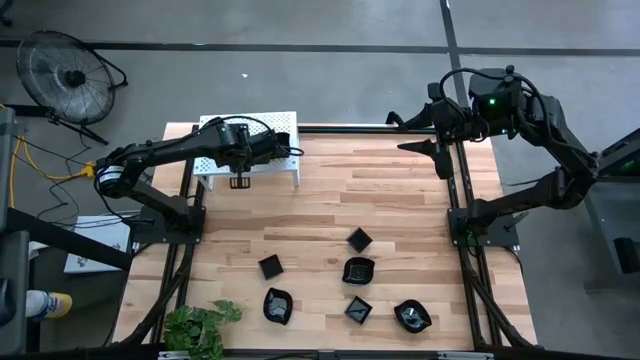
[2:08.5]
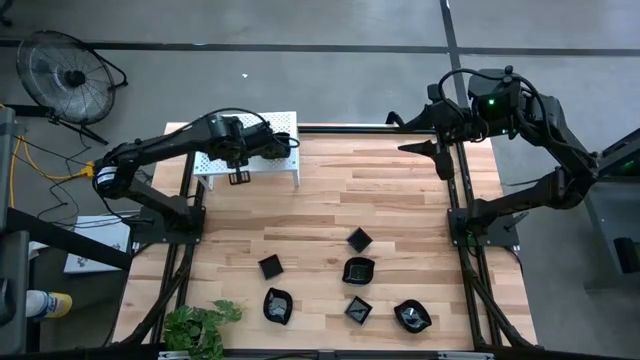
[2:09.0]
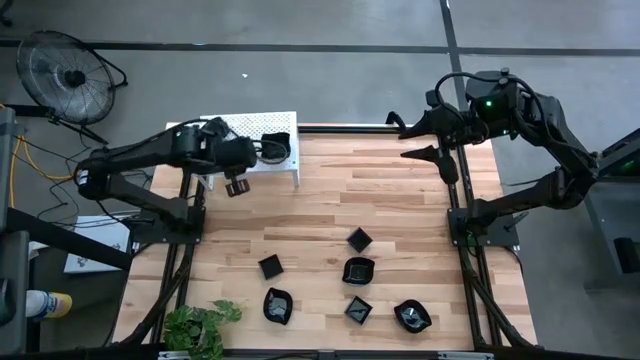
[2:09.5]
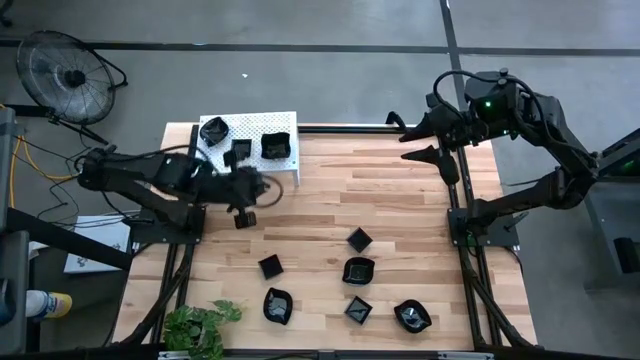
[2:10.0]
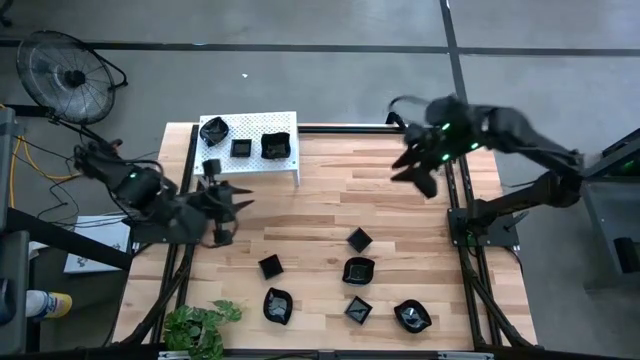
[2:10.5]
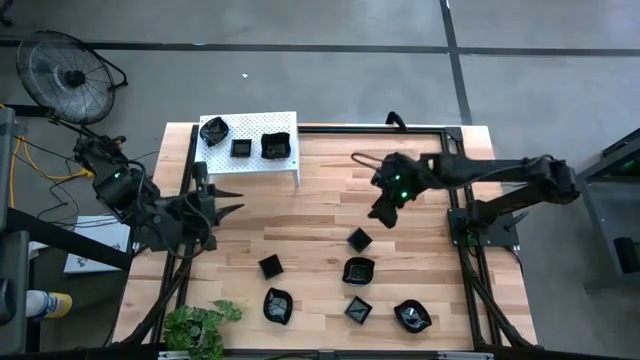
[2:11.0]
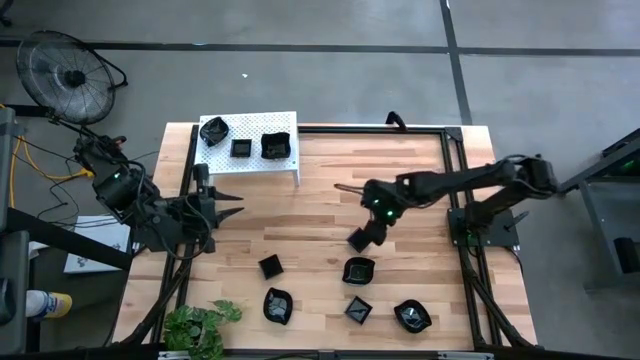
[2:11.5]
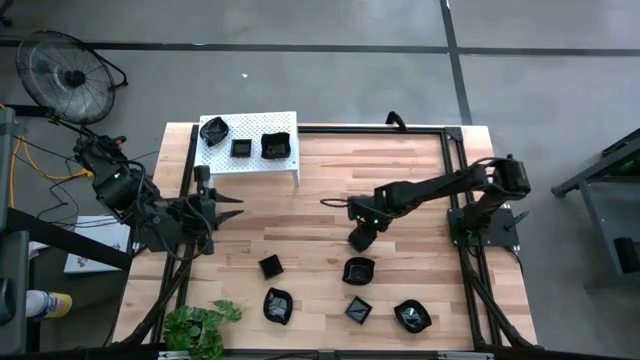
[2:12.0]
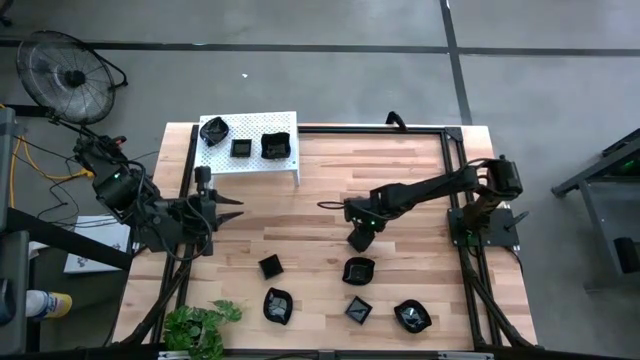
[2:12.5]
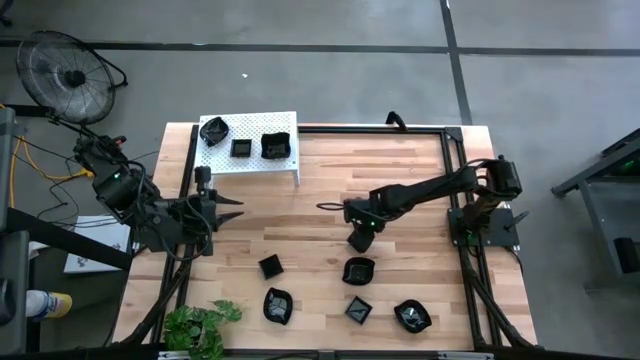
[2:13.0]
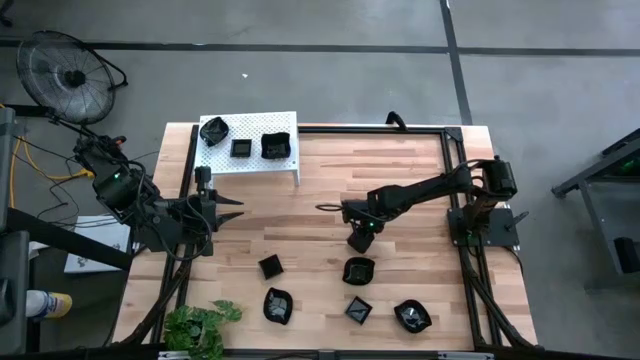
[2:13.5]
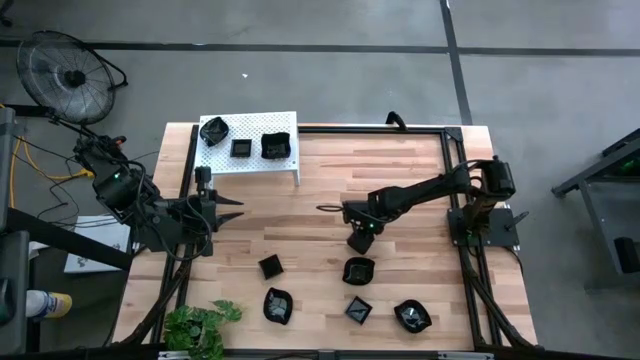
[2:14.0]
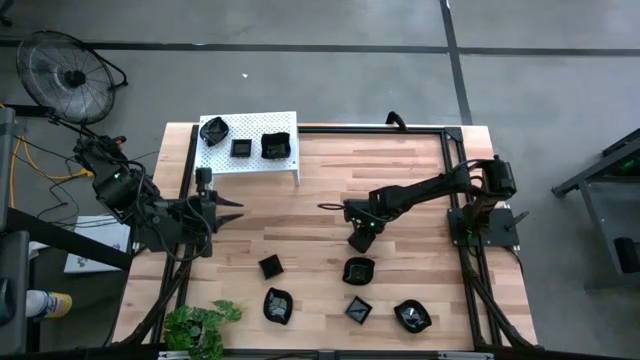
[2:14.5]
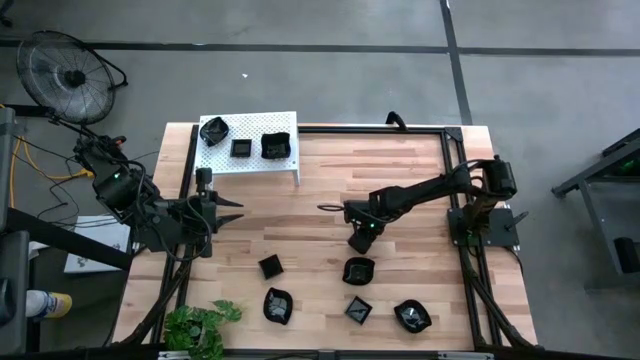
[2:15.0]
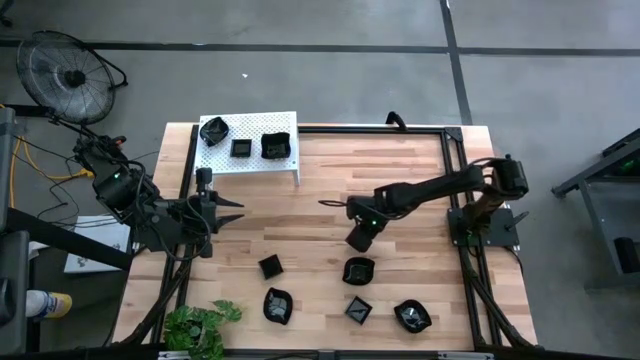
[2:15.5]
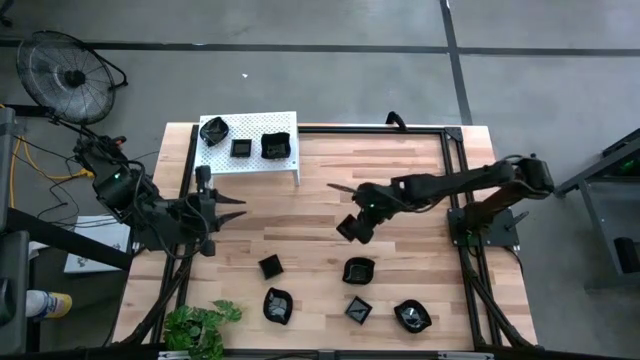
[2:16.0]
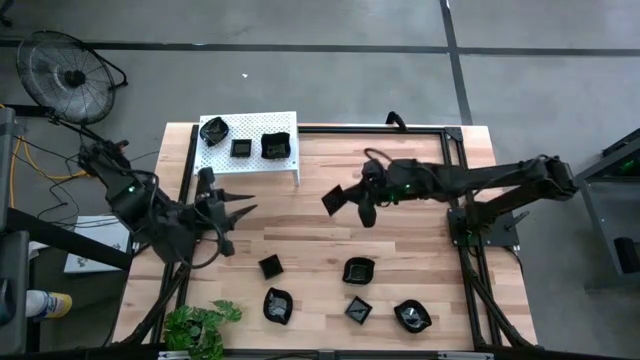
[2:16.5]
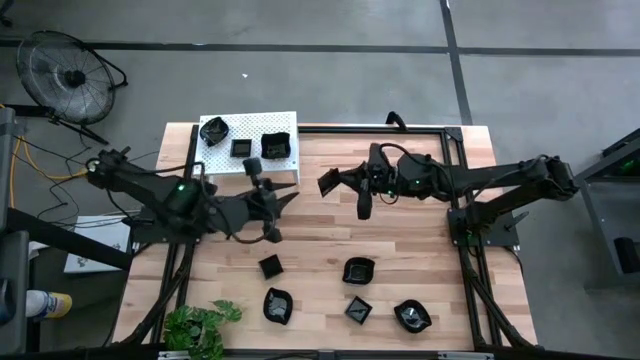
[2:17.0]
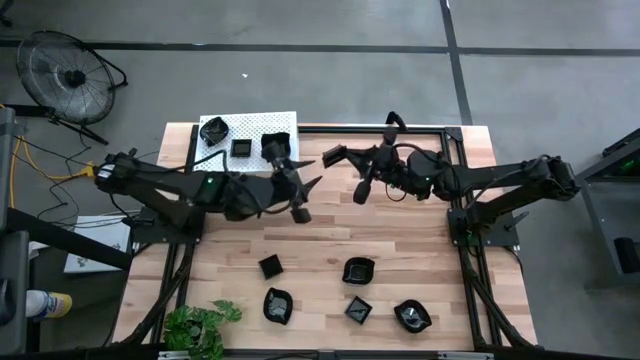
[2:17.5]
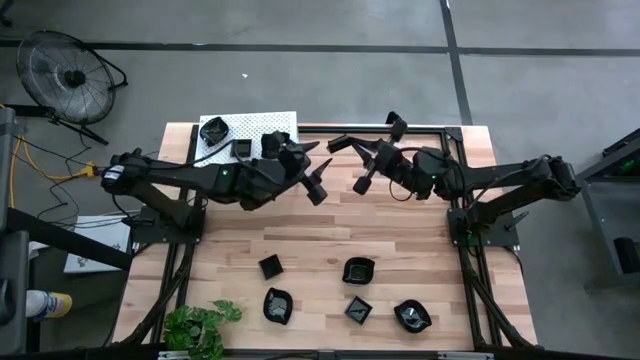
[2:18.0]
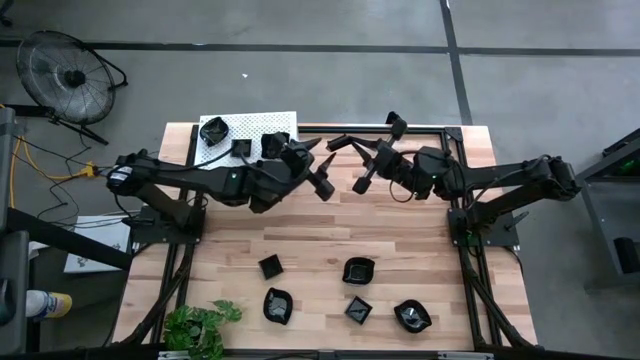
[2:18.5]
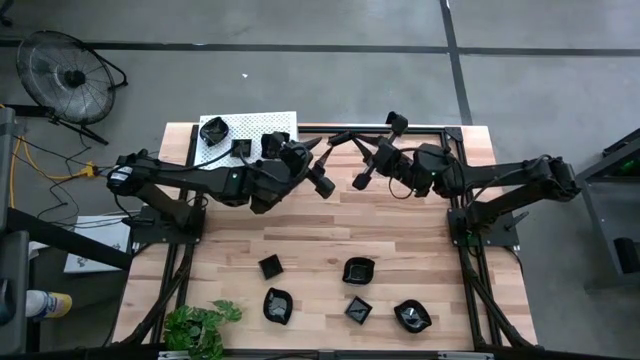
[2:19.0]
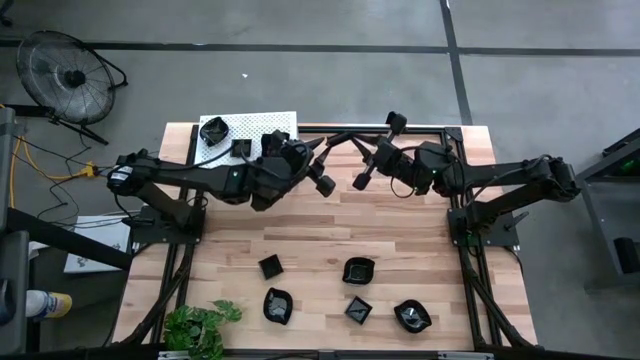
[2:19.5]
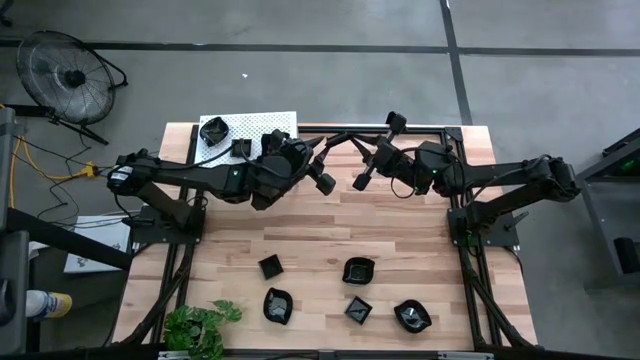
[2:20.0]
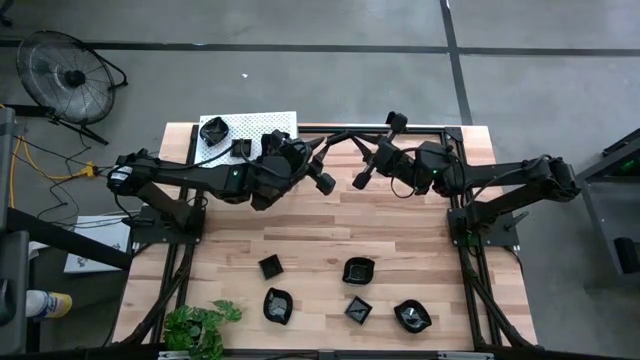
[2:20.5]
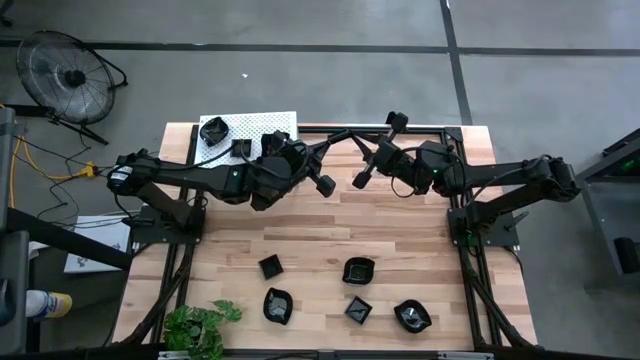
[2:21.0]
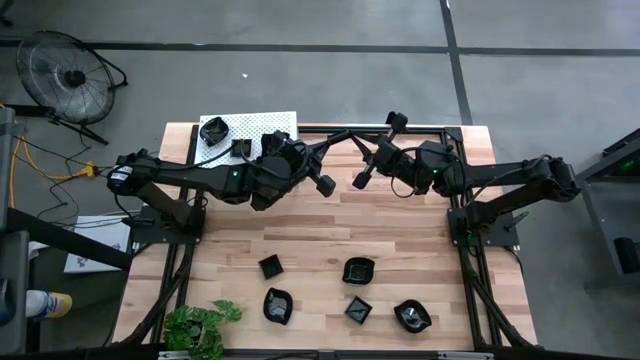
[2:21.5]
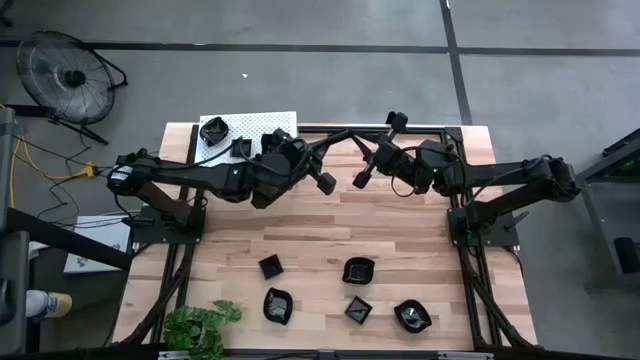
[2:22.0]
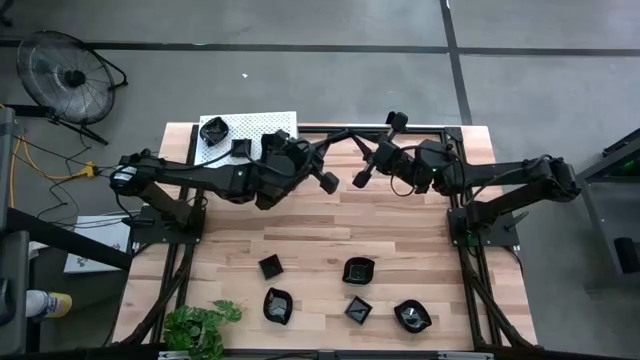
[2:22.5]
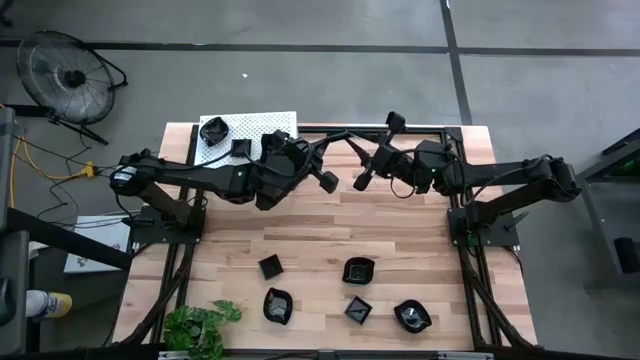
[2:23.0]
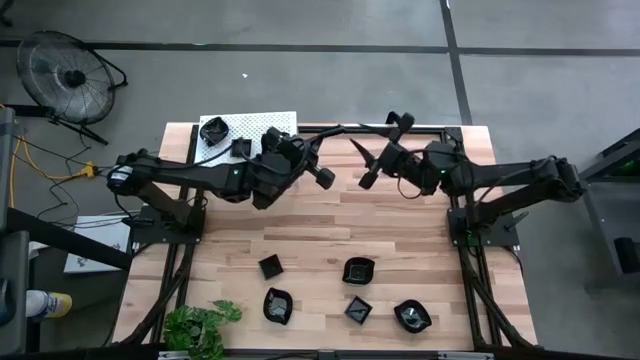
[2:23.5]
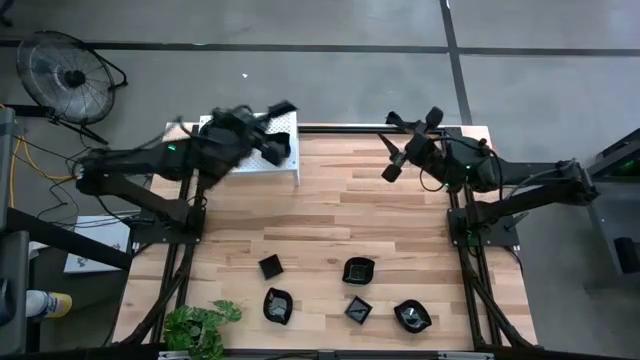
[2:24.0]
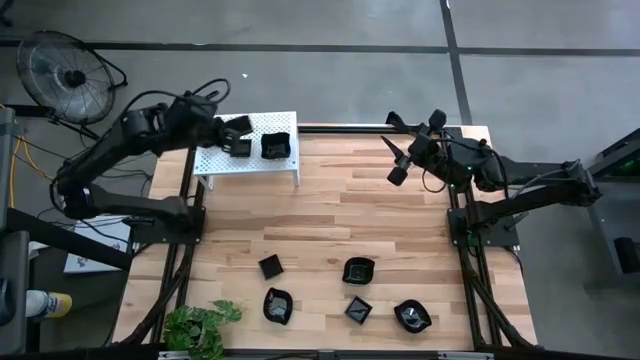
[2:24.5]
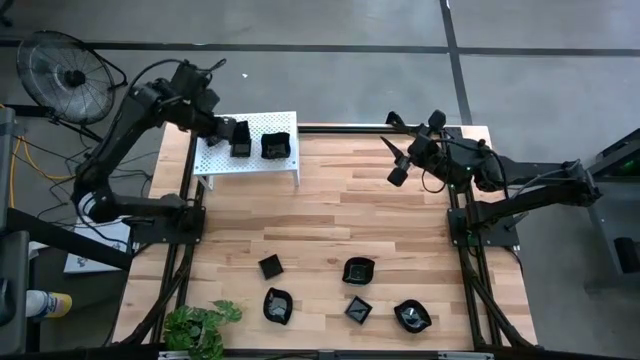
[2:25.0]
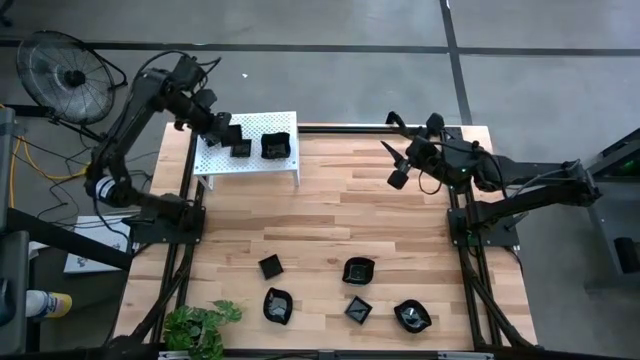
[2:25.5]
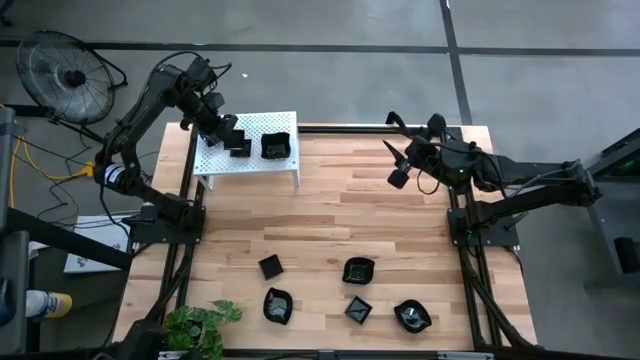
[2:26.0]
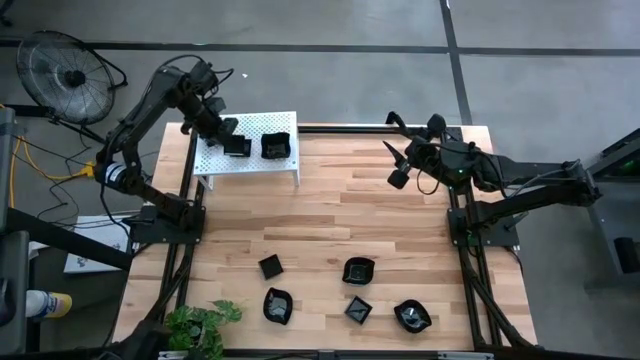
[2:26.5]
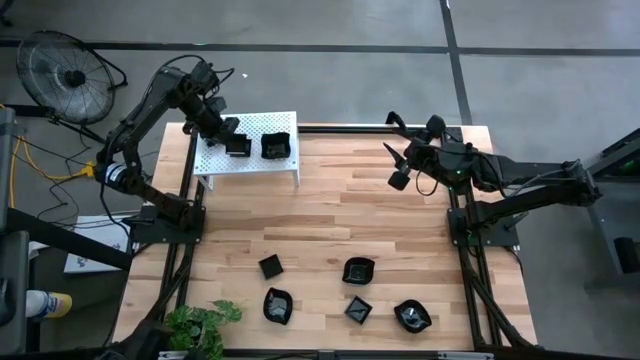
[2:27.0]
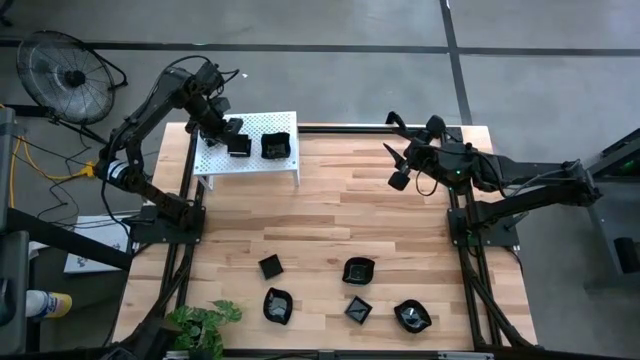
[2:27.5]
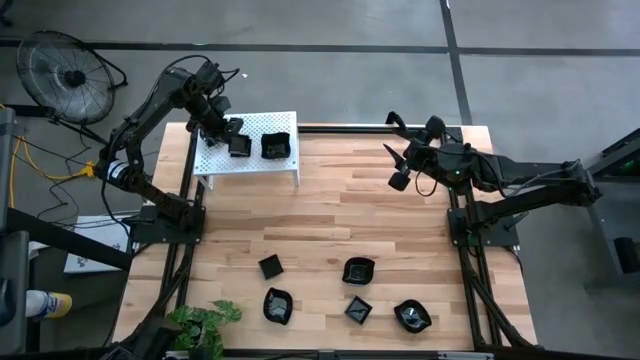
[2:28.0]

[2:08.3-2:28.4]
Task: Pick & Place Mini shaped plates
Stack the black square plate on top of the black square plate on the shelf

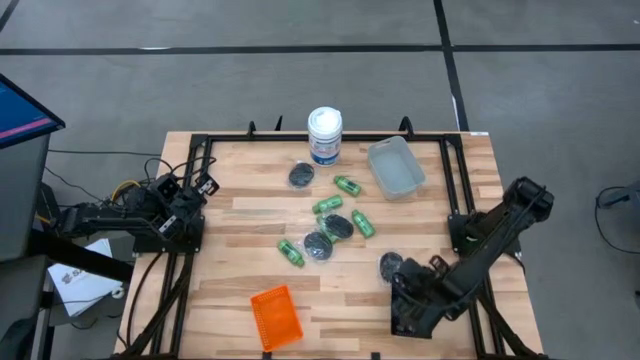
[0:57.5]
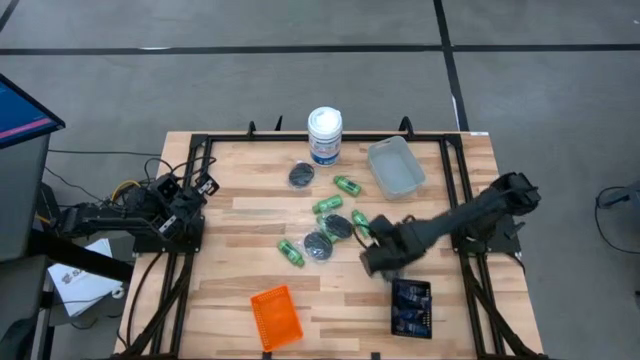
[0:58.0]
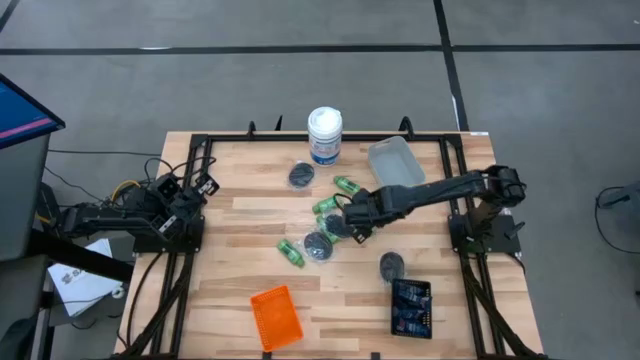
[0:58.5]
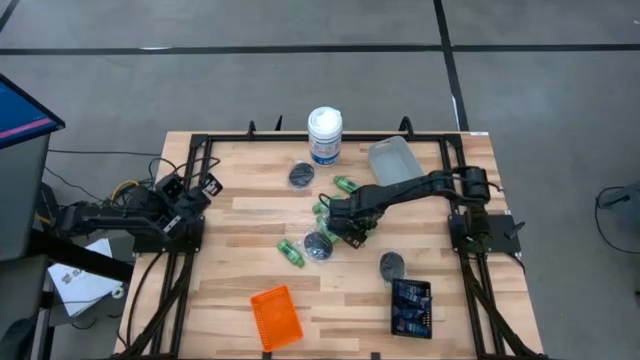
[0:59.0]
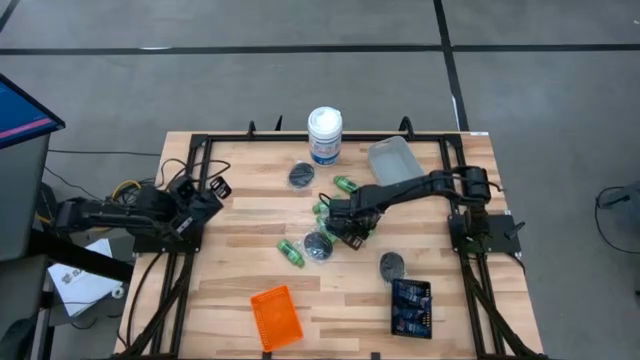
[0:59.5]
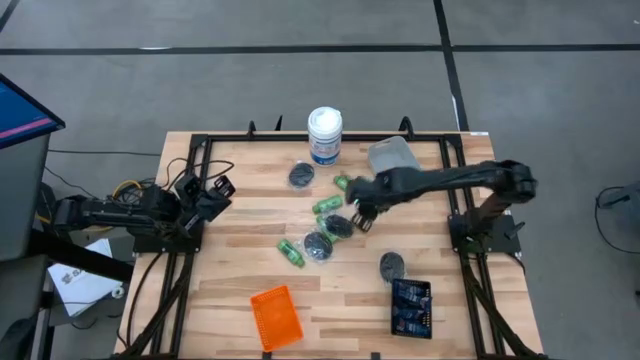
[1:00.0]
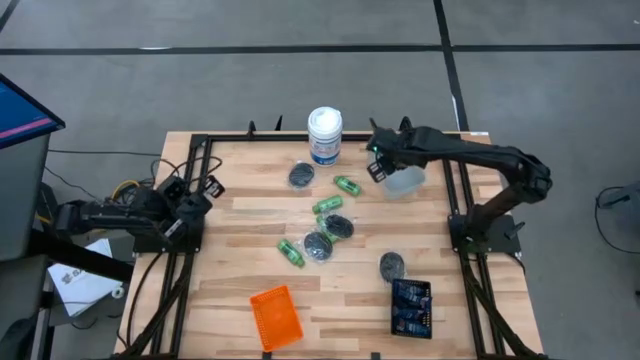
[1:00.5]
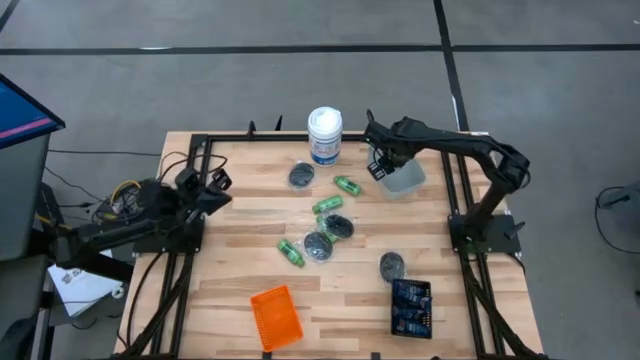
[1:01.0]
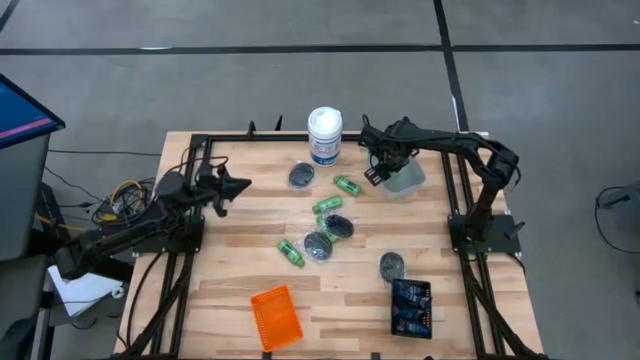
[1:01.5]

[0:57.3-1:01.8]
Task: Pick & Place Travel size toiletries
Put the green shampoo into the gray basket
